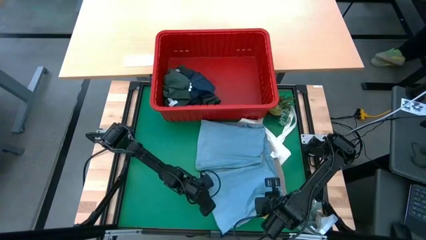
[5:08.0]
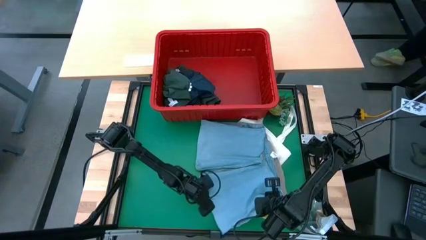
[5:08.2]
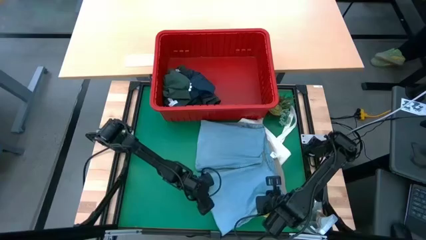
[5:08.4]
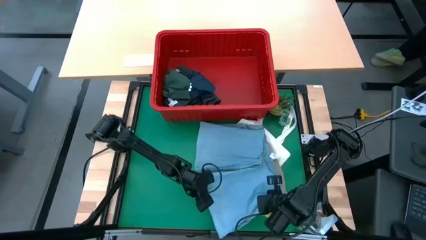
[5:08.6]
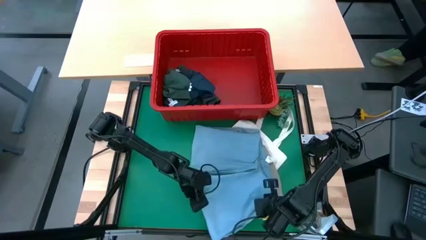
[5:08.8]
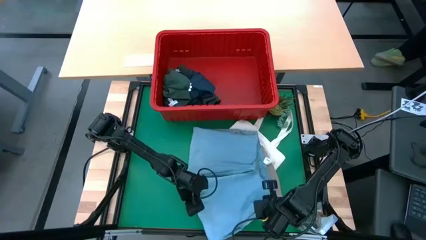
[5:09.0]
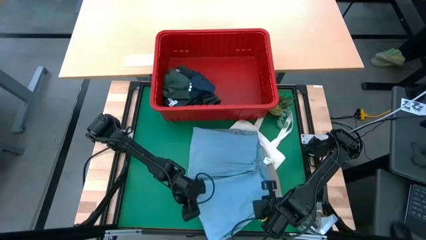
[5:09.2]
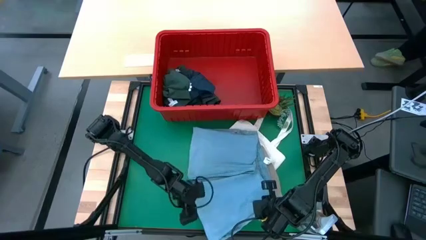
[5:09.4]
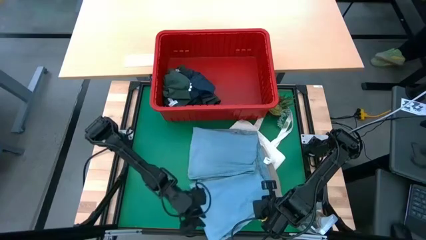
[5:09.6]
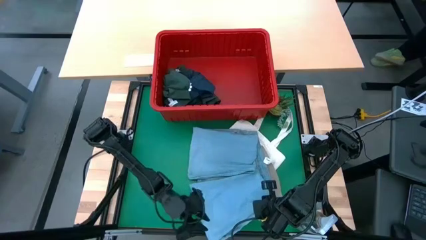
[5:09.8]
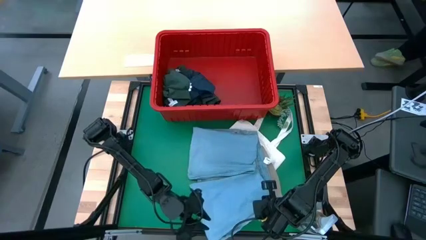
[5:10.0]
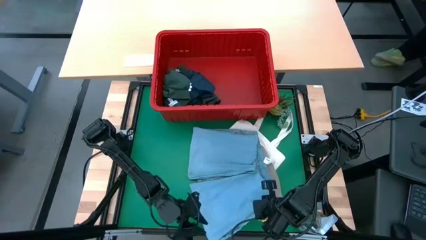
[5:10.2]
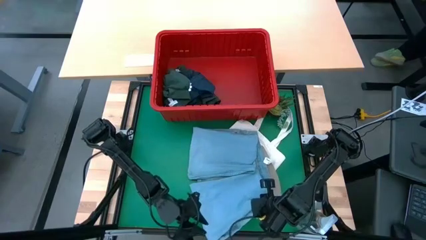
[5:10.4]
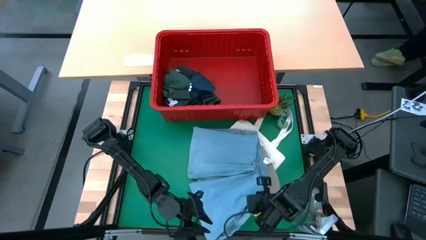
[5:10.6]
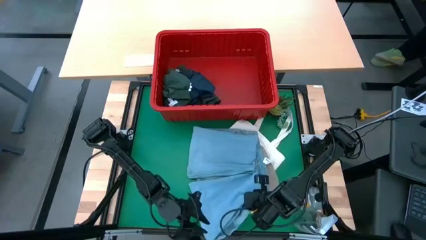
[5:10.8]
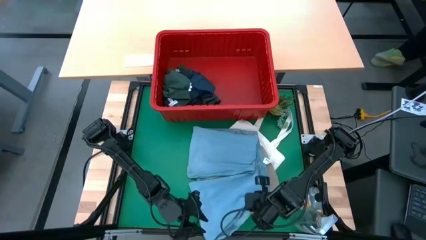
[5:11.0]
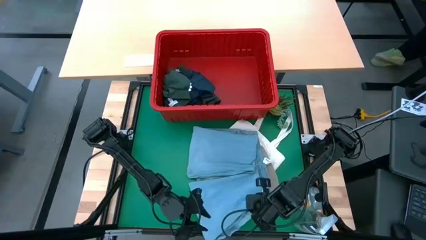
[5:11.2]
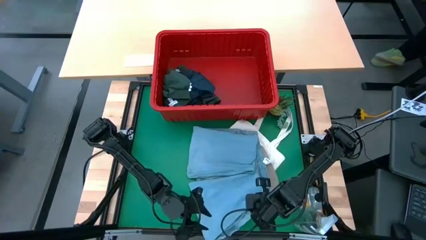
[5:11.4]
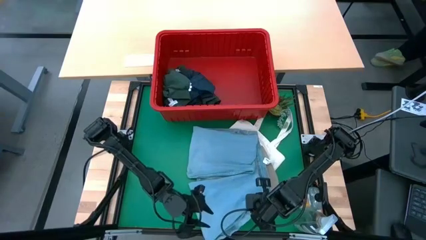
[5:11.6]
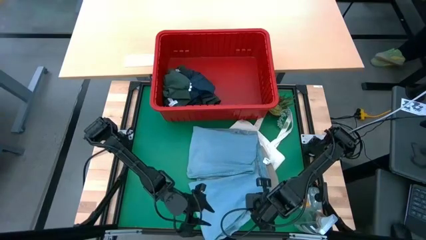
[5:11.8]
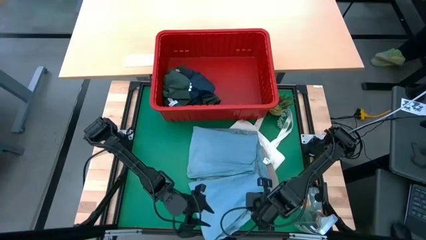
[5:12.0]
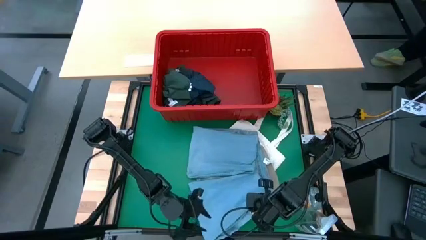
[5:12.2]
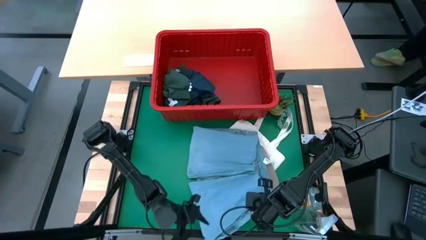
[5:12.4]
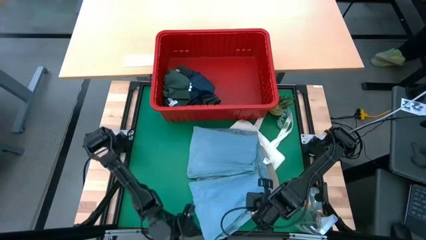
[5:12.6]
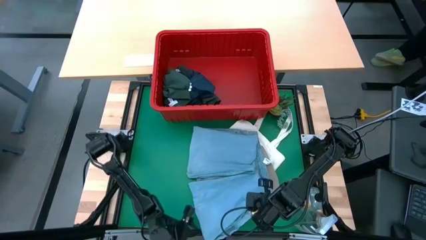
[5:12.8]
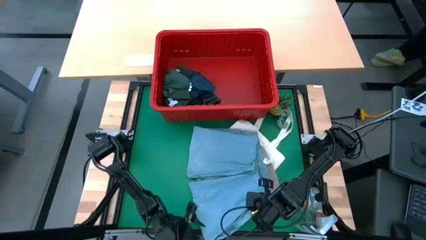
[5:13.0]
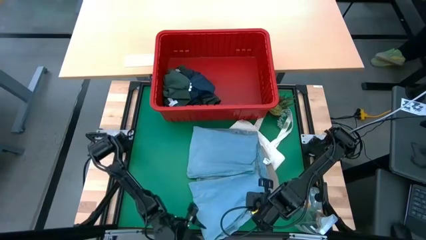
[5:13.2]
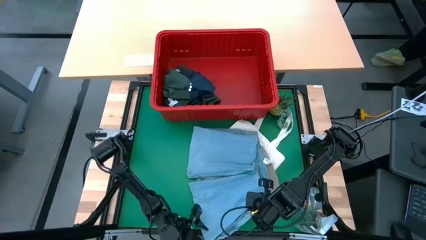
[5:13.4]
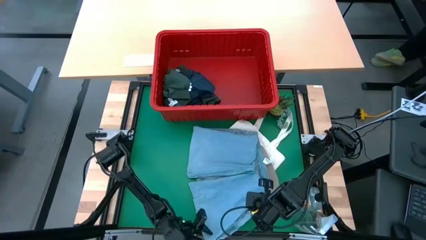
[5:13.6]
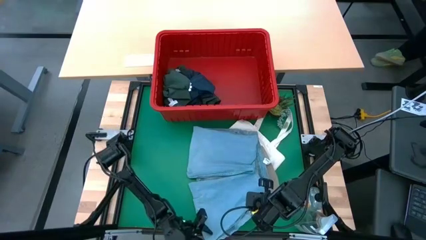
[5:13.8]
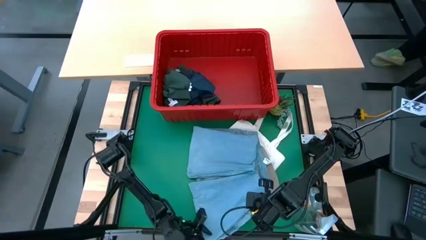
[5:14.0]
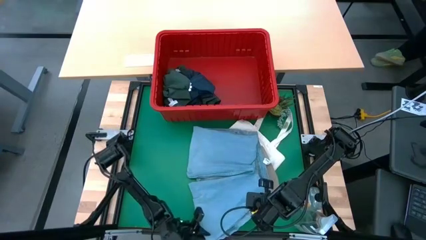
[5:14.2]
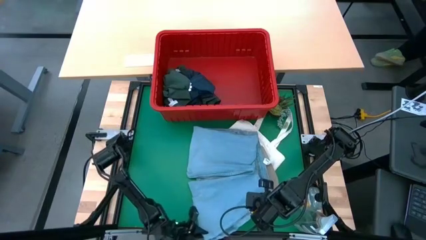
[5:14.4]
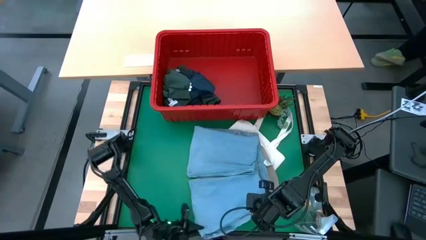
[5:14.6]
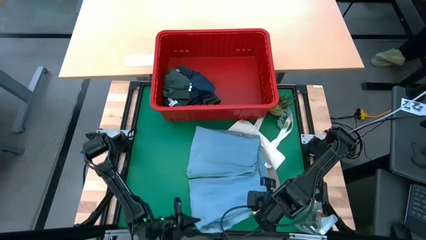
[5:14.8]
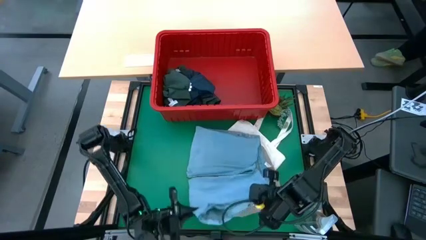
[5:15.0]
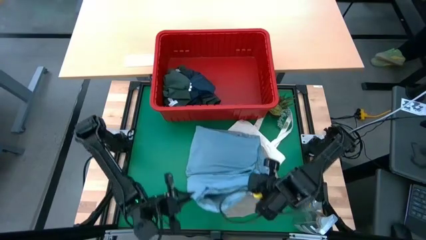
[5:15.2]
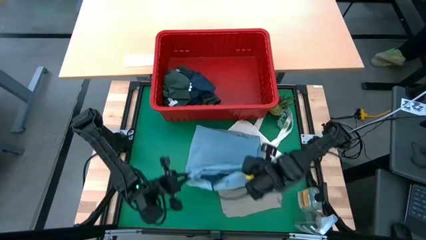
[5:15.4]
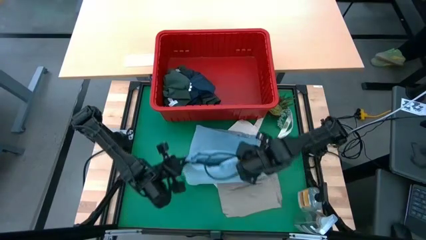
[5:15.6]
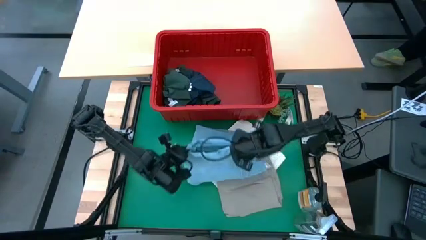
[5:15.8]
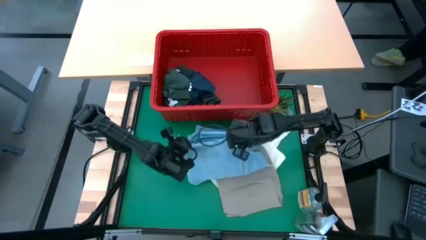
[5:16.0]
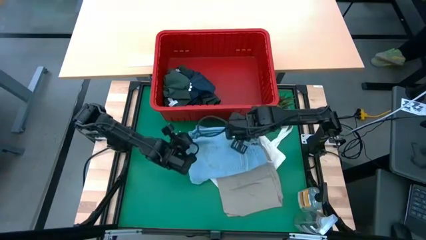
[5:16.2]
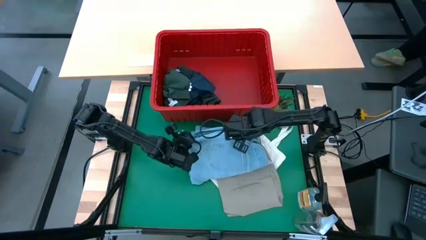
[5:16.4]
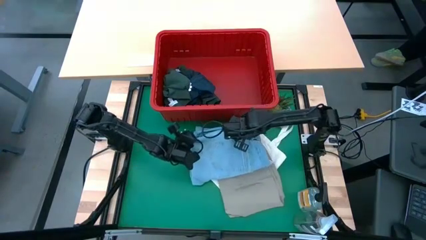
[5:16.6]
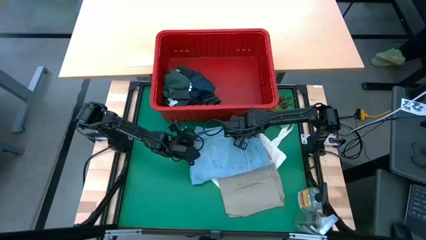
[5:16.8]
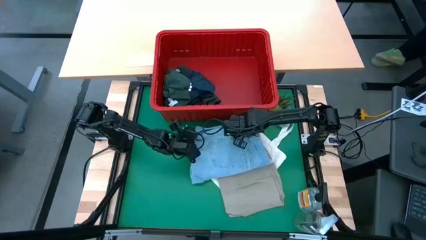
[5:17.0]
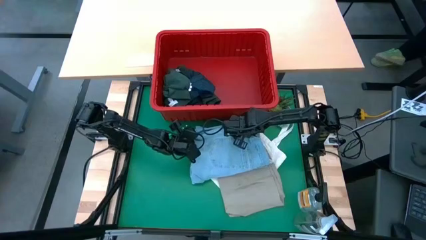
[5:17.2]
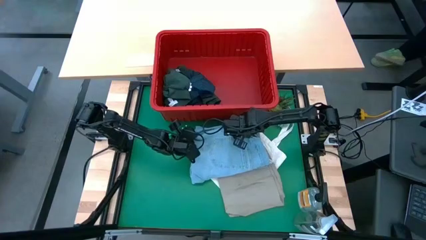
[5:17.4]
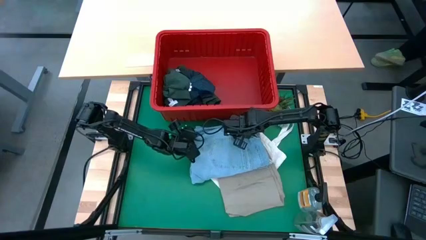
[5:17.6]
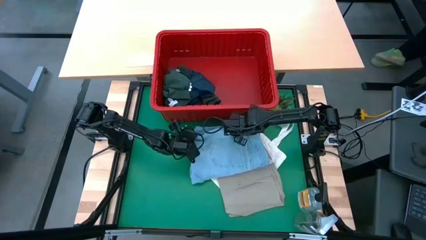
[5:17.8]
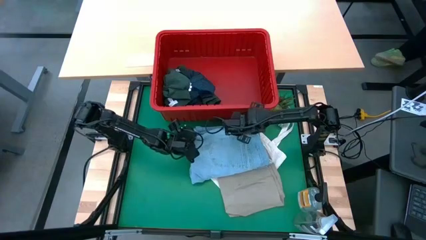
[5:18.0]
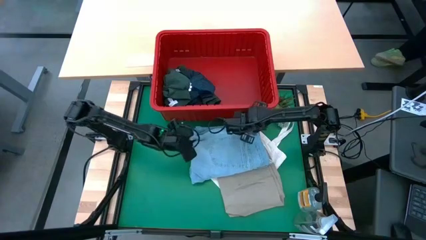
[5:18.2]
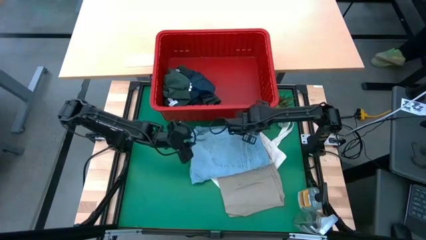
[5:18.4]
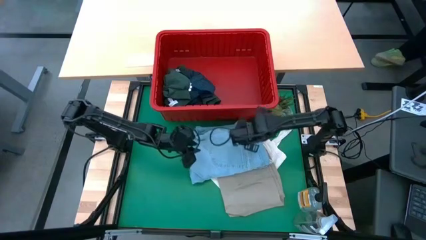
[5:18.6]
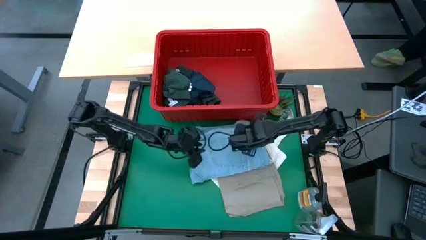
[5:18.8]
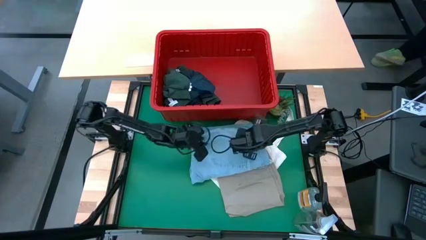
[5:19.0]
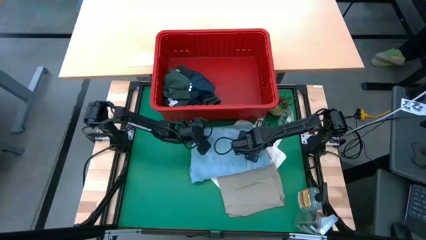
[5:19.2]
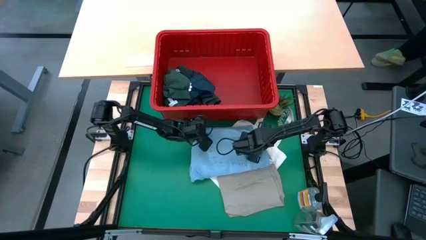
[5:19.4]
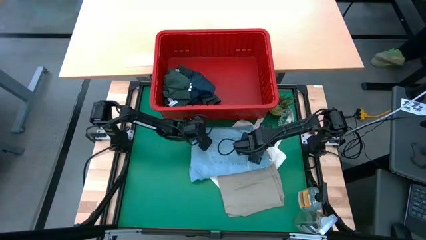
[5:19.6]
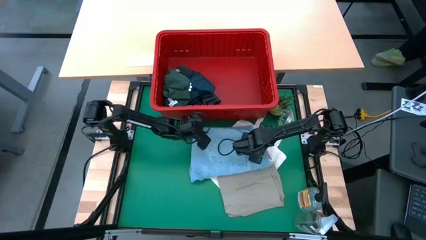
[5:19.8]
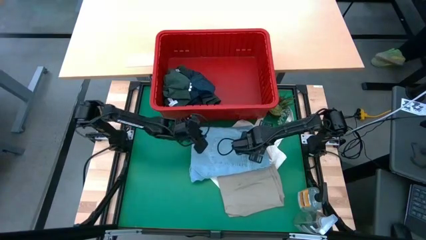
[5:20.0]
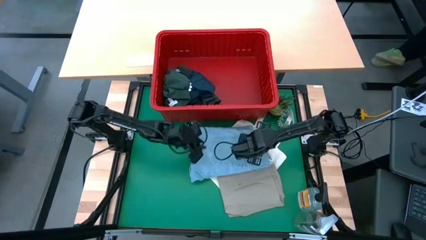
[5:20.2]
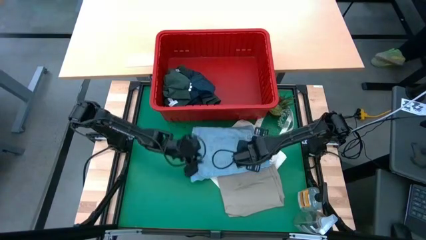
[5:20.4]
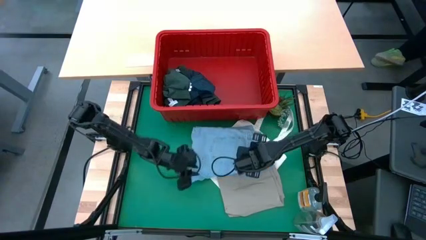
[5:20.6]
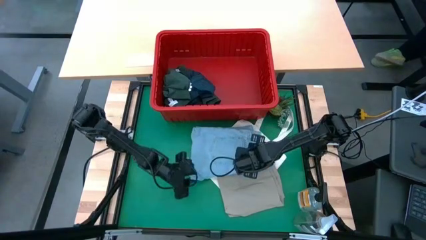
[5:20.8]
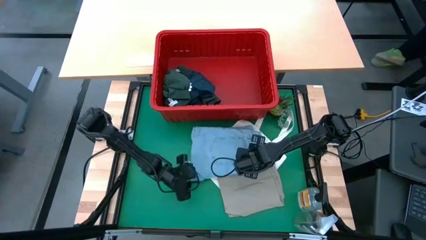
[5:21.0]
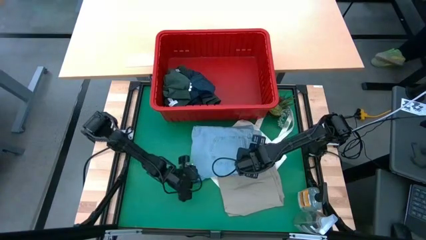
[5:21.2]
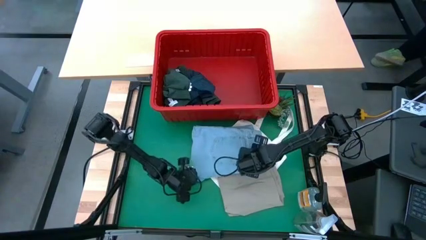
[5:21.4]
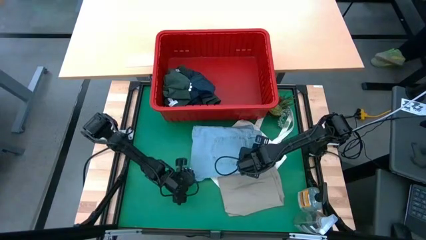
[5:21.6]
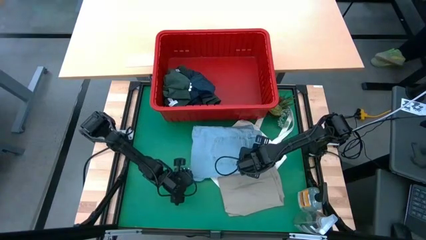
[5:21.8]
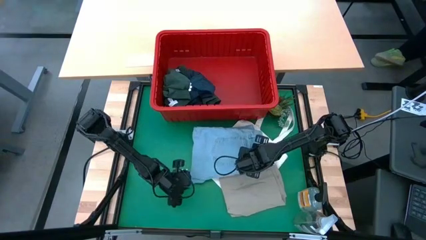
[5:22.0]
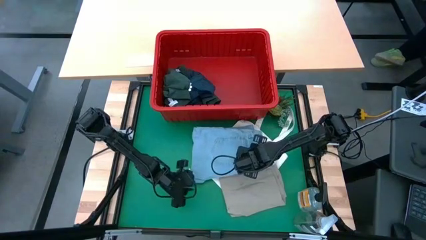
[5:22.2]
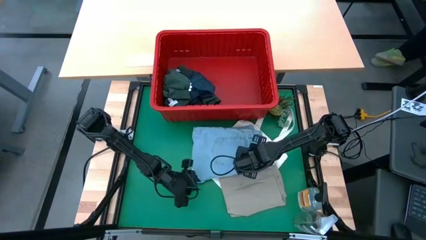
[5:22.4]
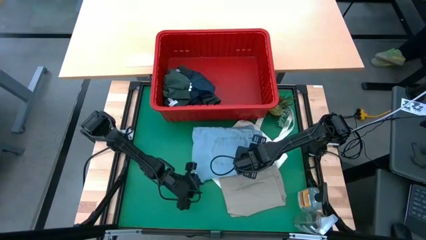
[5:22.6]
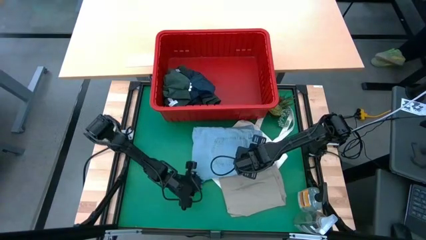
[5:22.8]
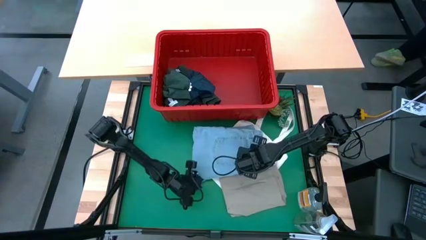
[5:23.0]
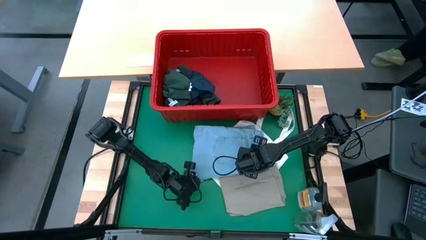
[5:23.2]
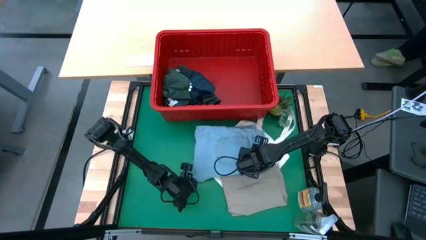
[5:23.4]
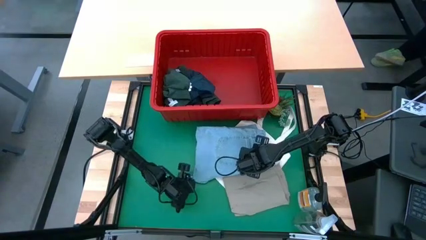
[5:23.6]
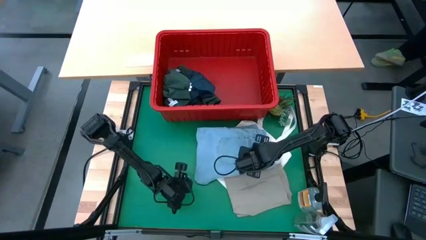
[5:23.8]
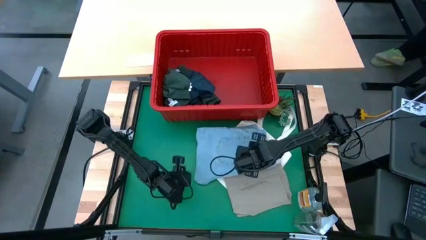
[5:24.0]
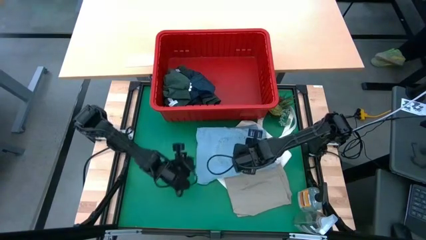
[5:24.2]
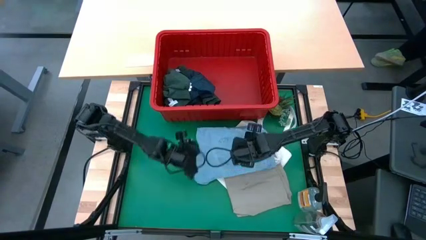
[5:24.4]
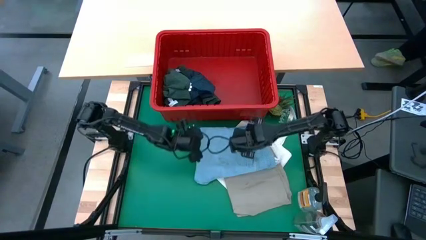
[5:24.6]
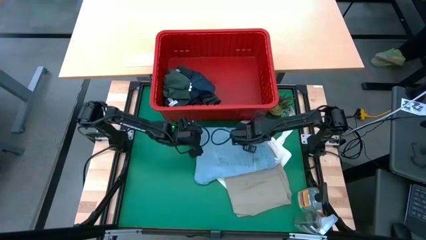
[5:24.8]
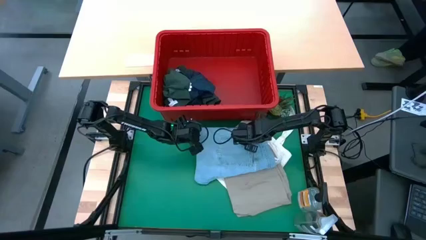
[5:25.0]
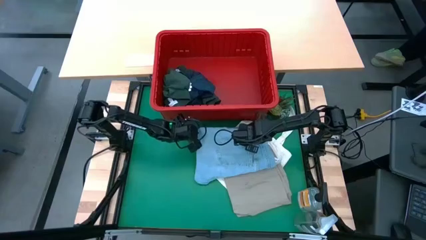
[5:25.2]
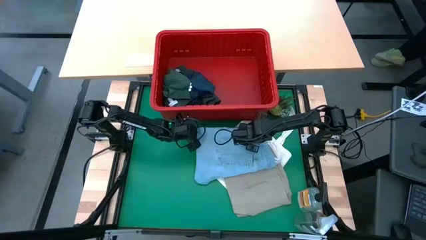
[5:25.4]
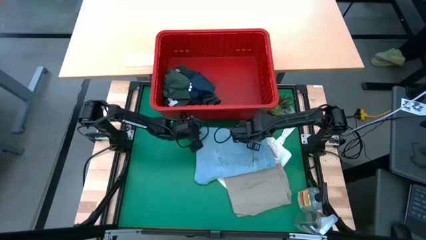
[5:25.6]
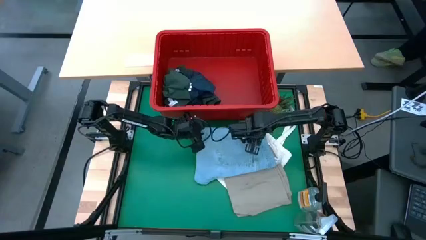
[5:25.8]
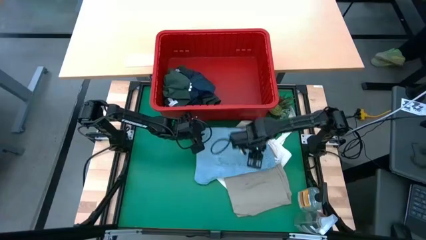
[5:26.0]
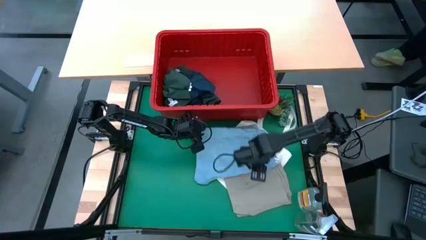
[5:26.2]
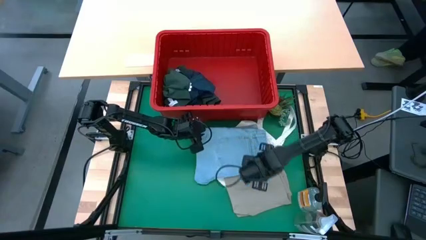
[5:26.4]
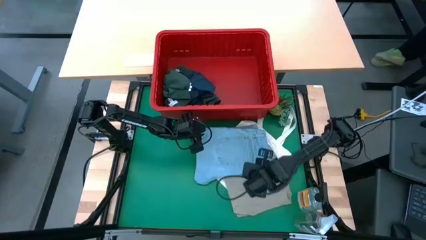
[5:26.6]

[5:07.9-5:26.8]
Task: Fold Laundry from Bin
Fold the light blue jeans
